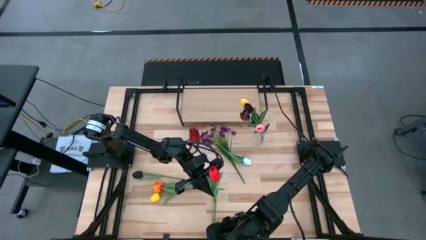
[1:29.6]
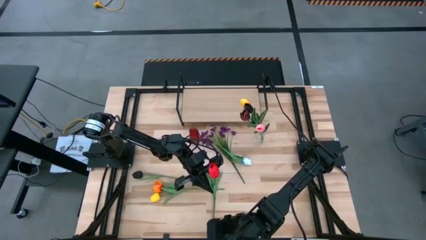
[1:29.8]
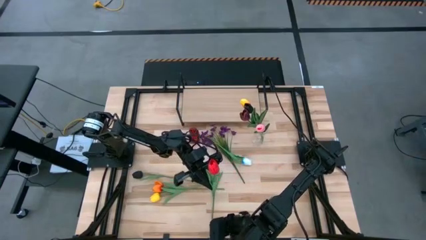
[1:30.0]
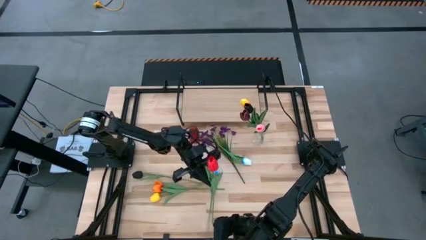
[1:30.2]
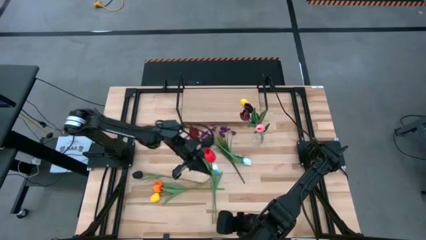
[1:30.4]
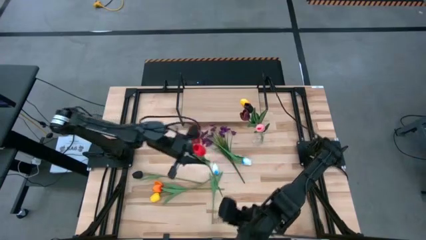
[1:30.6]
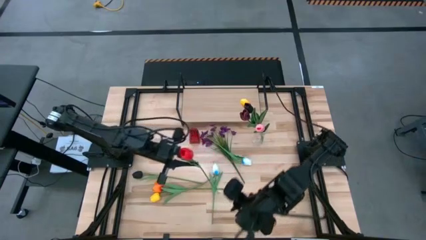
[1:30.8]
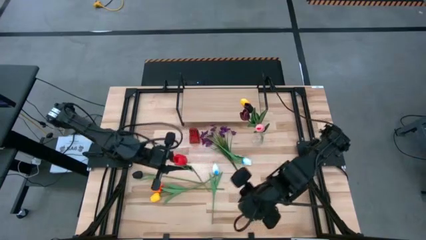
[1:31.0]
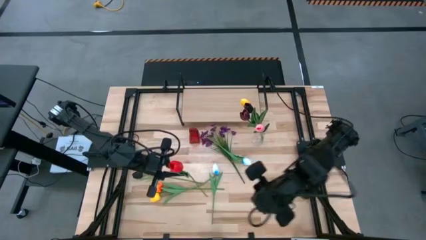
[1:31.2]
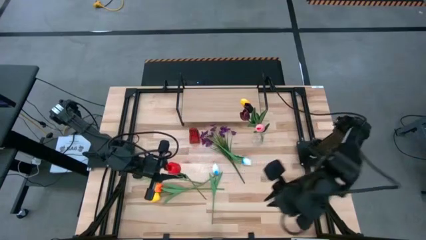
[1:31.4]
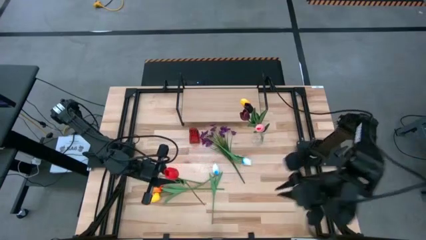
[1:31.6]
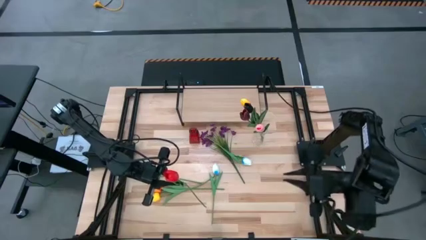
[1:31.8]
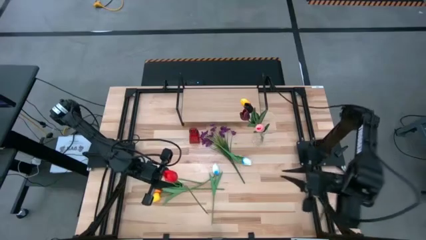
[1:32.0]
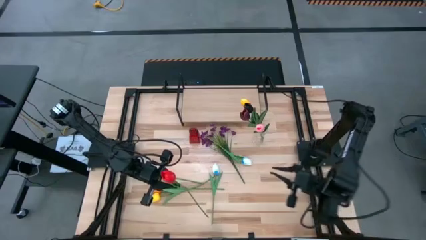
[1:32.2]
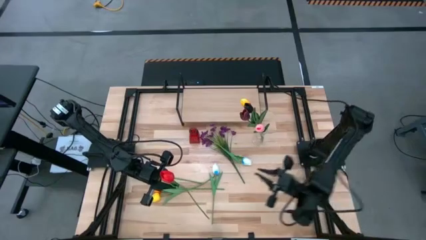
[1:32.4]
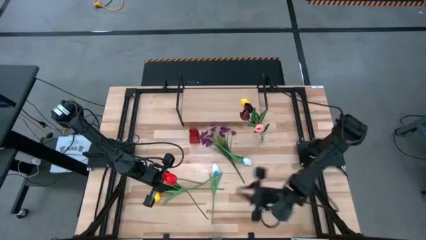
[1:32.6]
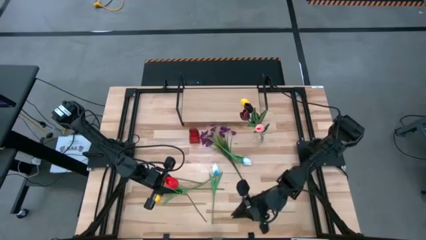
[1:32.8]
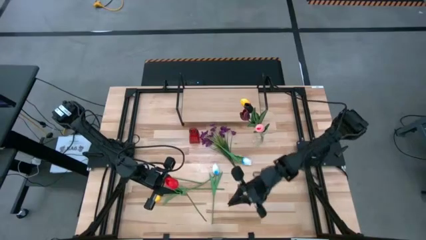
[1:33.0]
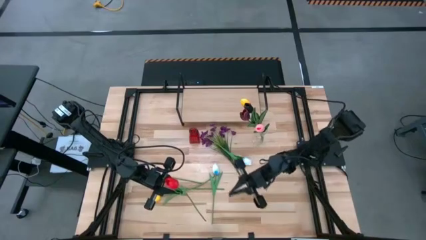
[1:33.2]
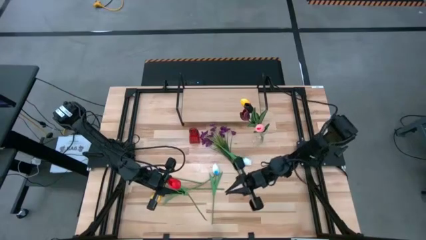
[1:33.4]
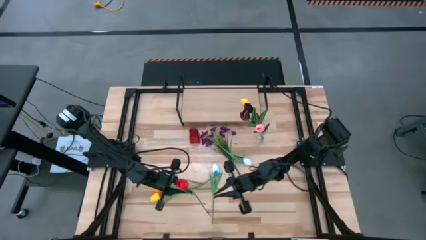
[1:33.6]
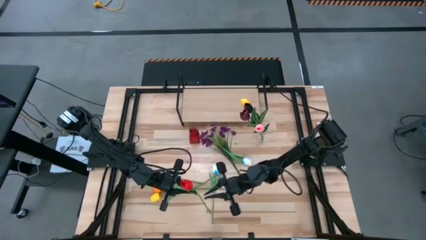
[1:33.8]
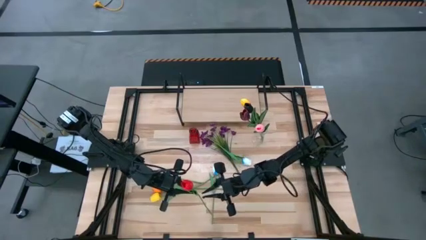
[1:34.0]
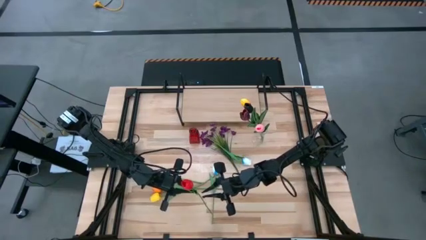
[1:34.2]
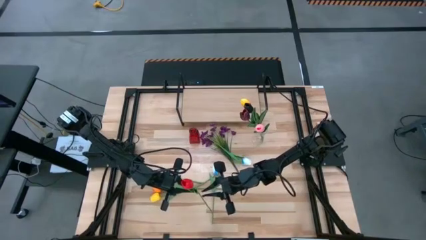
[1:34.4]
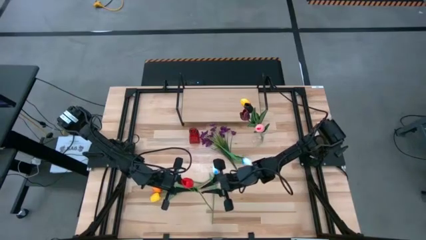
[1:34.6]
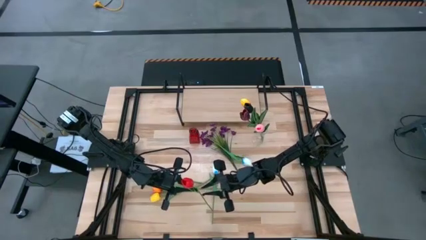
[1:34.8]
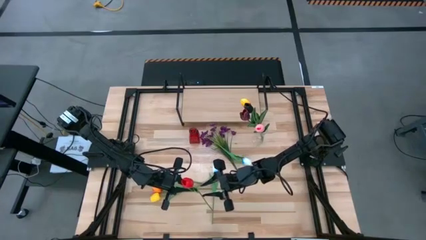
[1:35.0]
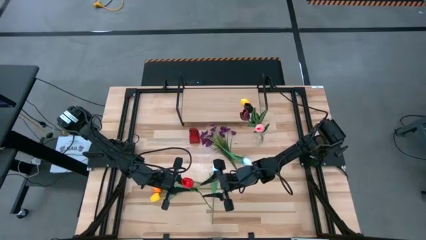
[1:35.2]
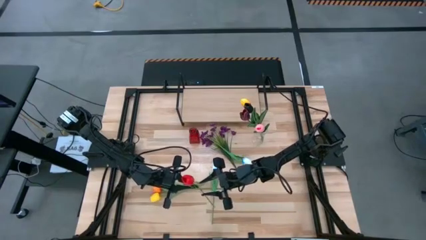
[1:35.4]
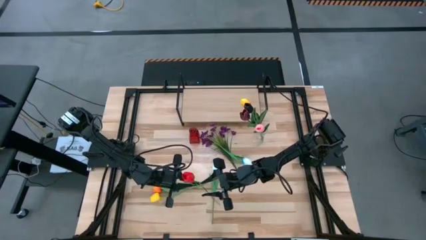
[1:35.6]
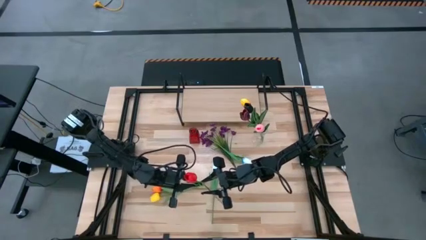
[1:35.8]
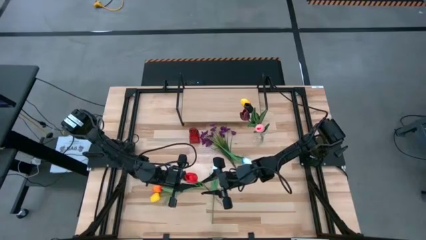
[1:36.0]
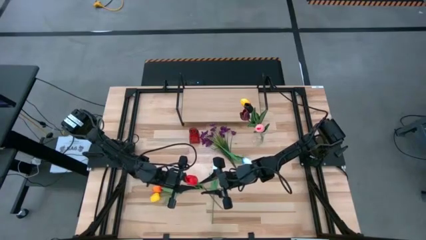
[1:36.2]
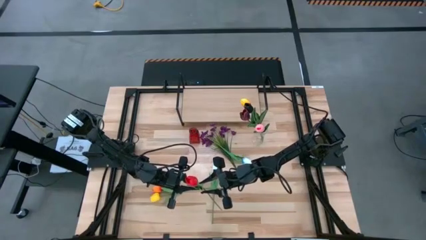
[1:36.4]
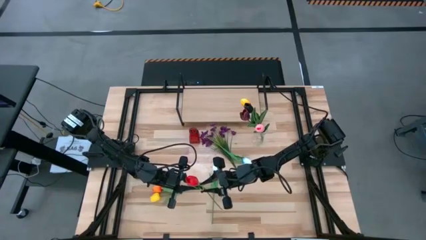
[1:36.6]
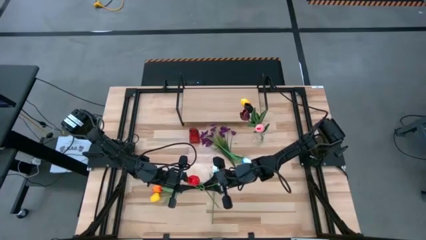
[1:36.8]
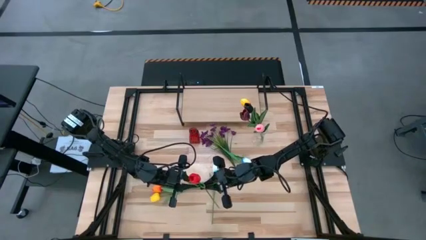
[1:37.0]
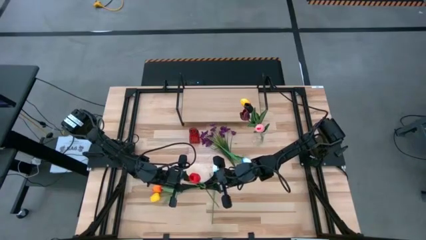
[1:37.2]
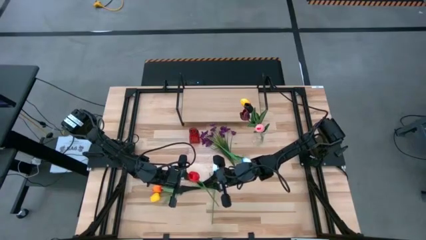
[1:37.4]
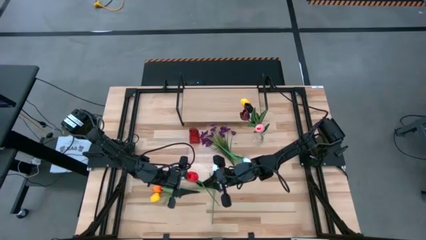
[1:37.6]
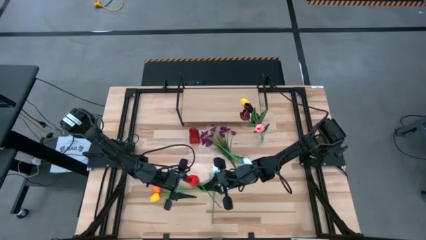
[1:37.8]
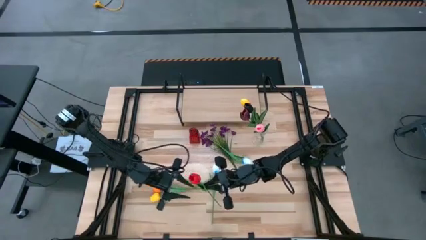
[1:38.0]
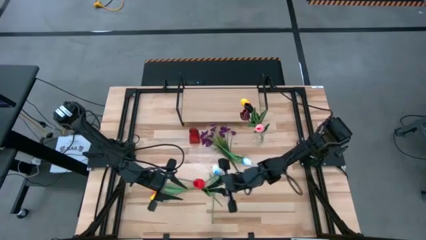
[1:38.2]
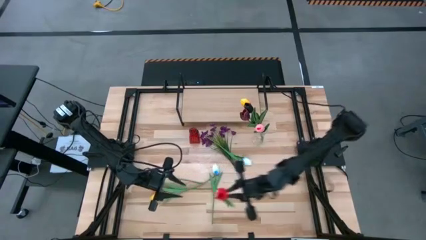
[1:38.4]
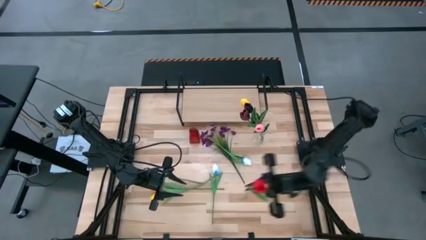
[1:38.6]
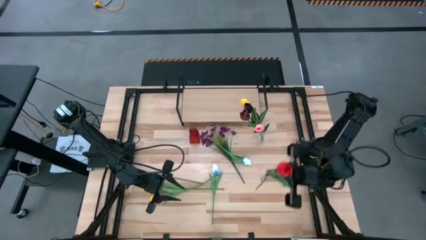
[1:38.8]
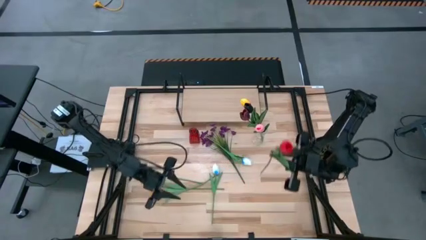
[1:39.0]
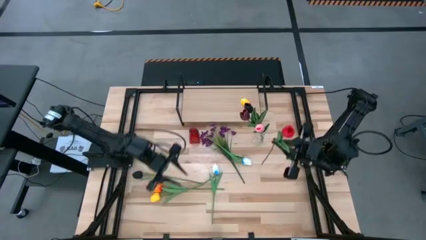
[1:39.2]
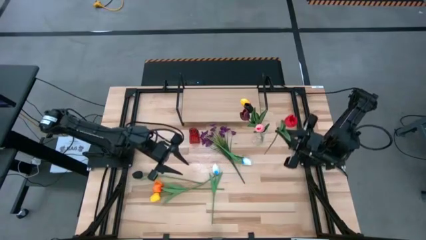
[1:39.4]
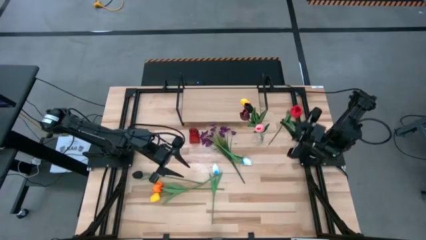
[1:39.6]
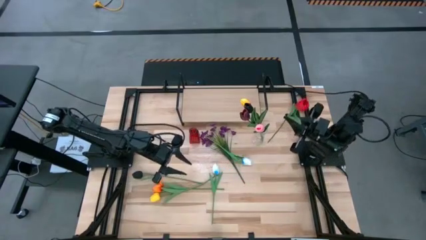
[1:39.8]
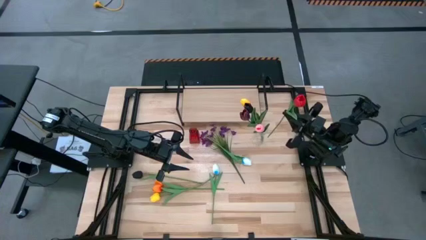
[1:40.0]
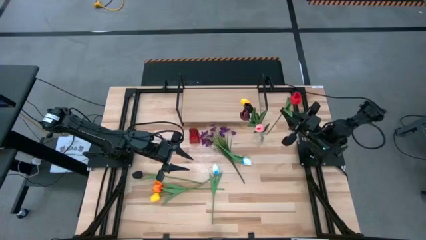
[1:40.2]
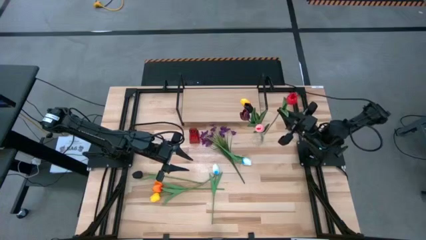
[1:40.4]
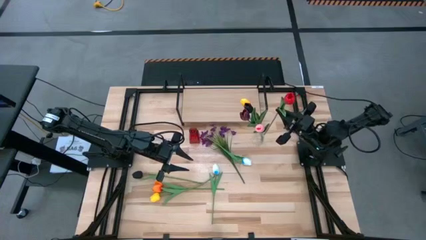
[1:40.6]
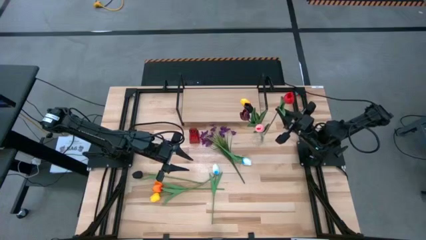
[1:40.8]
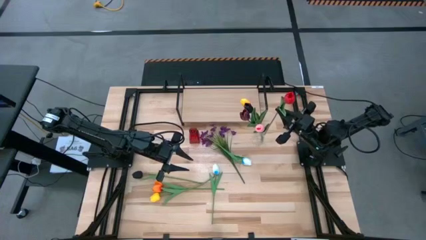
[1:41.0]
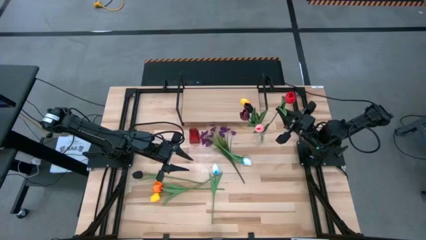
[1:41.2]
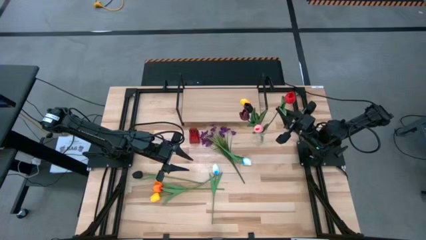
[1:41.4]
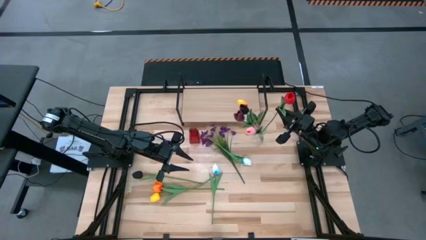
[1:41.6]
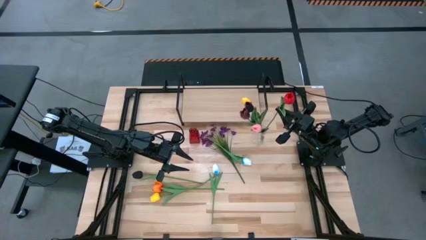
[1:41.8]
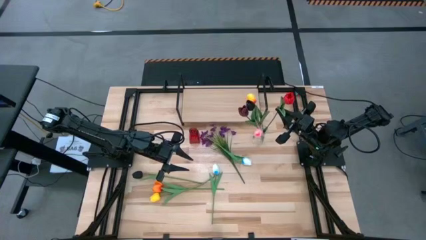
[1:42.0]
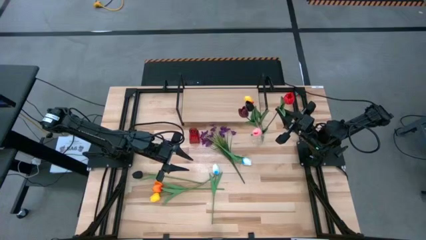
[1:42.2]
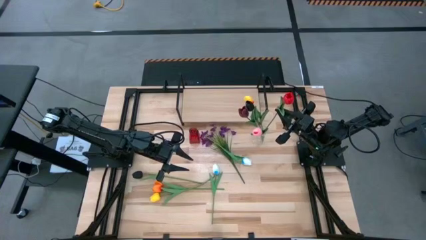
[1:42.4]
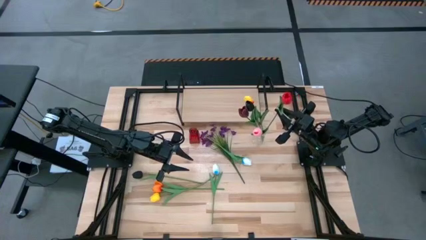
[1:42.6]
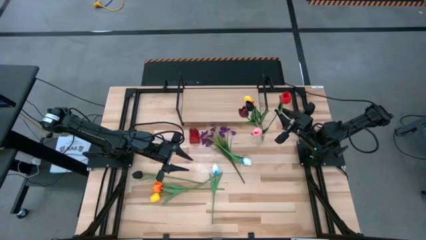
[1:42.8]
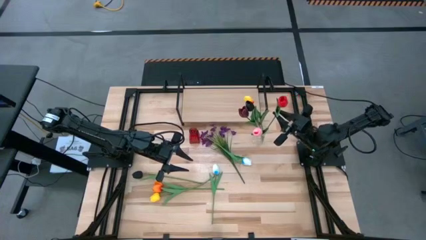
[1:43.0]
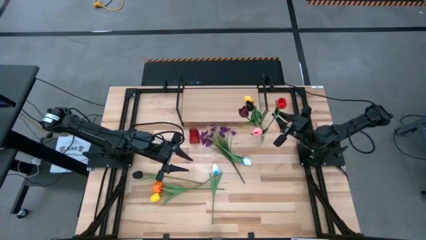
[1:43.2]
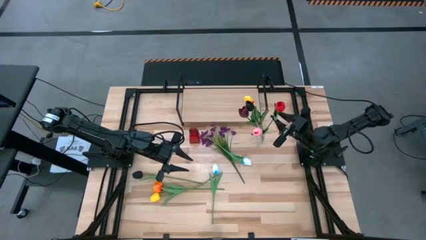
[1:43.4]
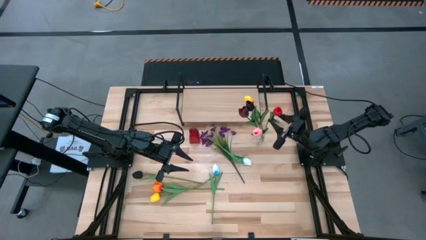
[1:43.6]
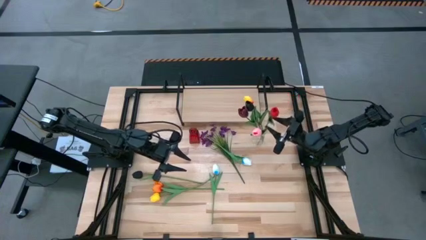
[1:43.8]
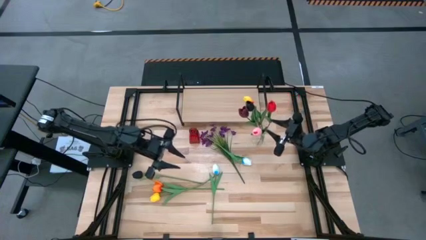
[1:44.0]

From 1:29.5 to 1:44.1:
Task: Pick and place flowers into a vace then onto a shelf
Put the red flower into the transparent vase

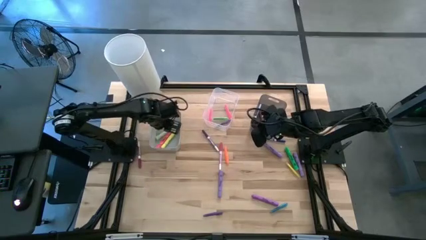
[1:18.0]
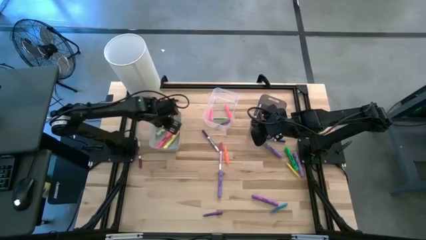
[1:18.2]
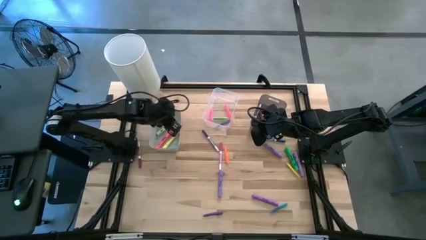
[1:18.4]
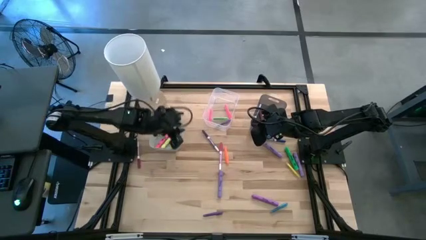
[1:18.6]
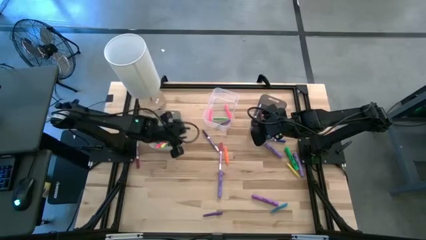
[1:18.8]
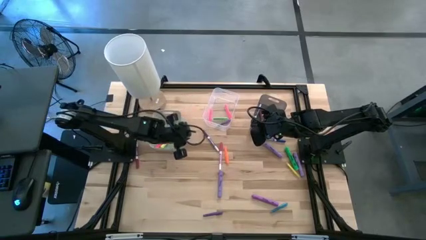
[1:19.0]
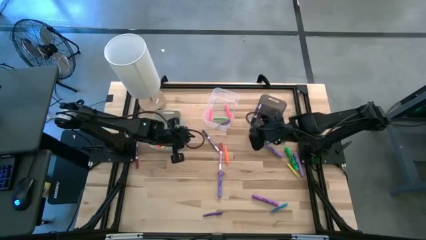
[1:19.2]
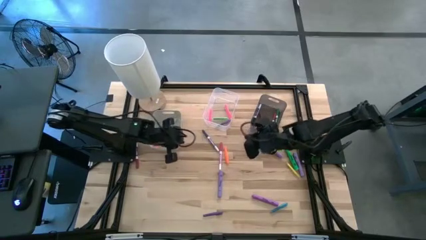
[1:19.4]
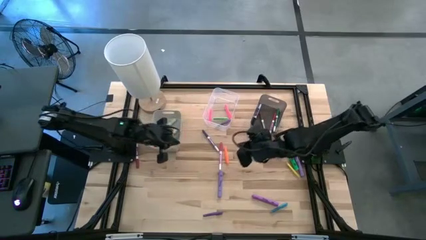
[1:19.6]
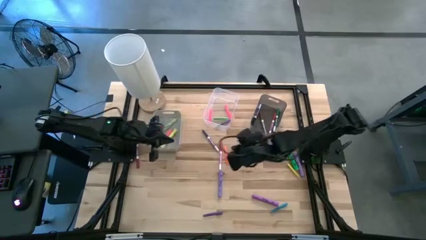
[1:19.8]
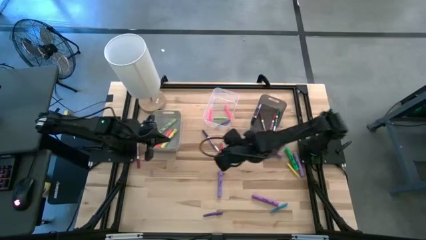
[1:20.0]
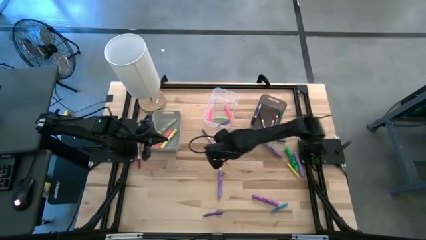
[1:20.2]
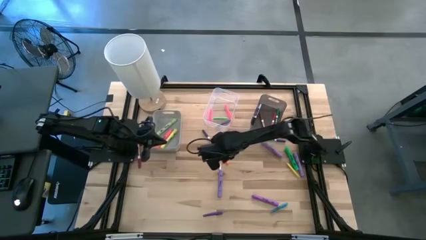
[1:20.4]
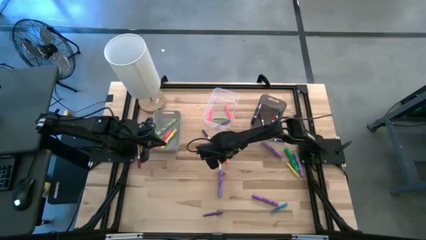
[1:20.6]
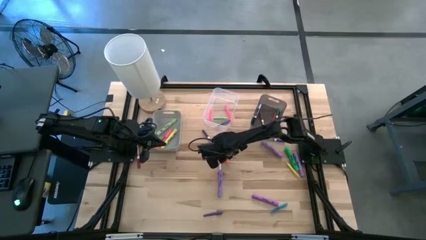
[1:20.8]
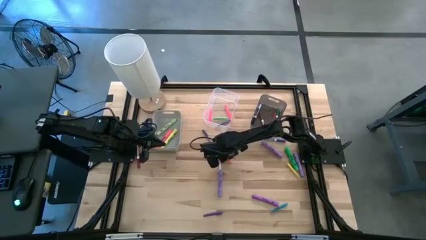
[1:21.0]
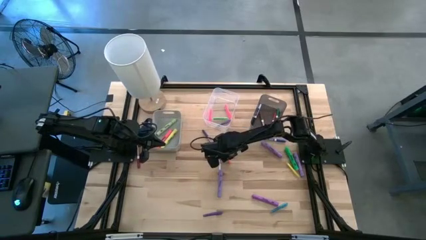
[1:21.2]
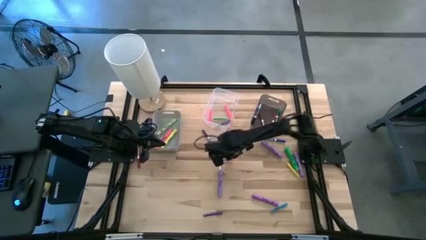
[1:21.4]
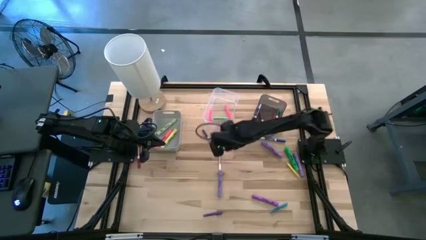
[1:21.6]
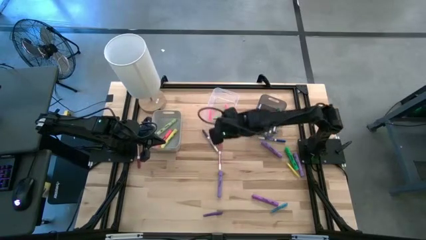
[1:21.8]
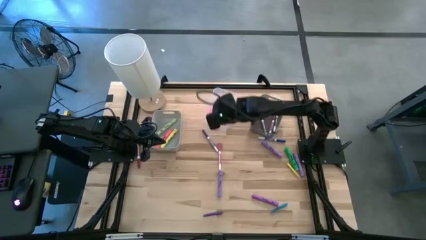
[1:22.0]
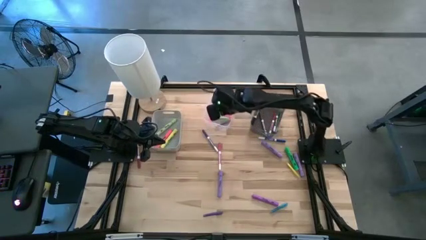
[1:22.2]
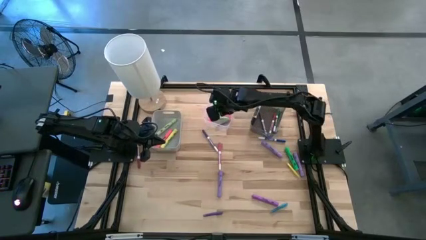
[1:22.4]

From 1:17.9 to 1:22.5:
Task: Pick & Place Markers
Put the orange pen into the transparent bin
